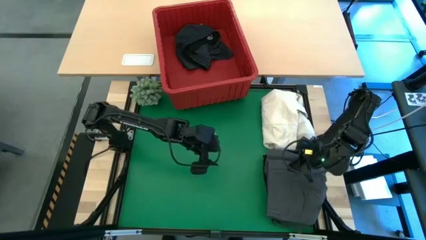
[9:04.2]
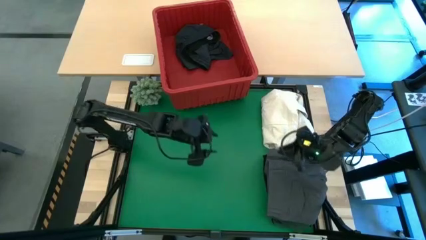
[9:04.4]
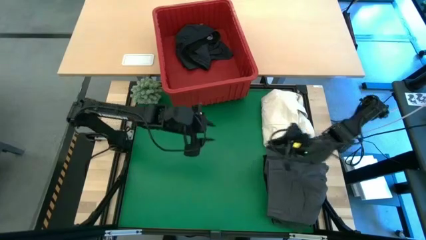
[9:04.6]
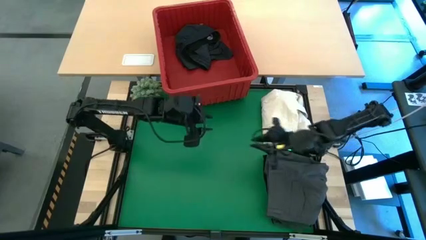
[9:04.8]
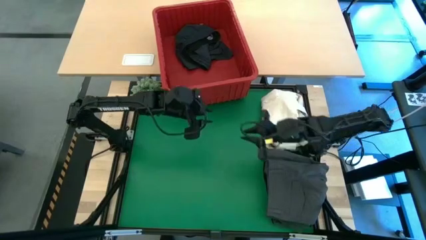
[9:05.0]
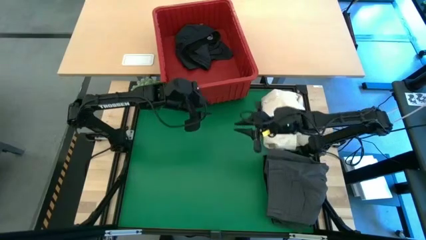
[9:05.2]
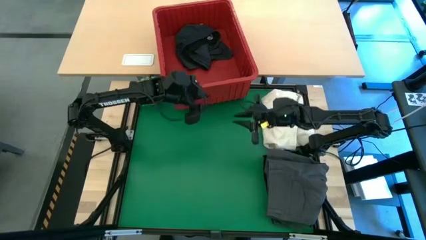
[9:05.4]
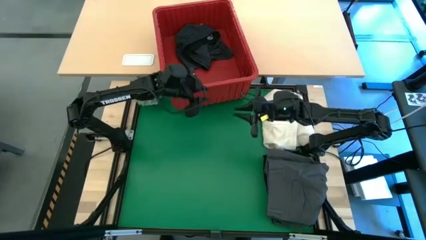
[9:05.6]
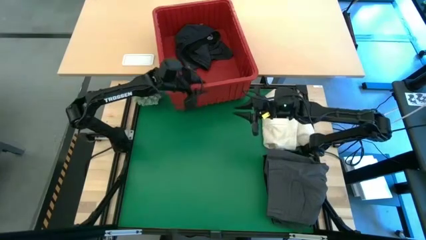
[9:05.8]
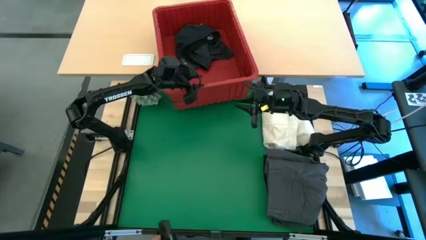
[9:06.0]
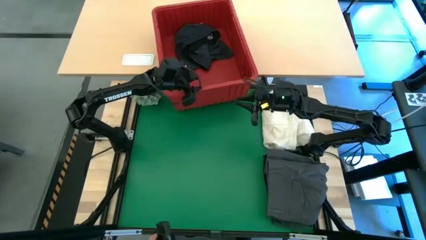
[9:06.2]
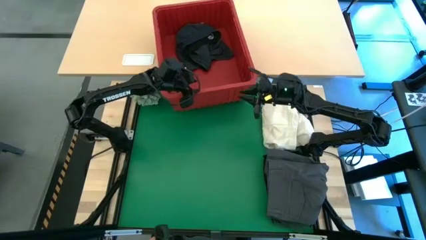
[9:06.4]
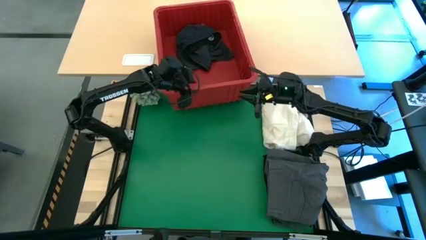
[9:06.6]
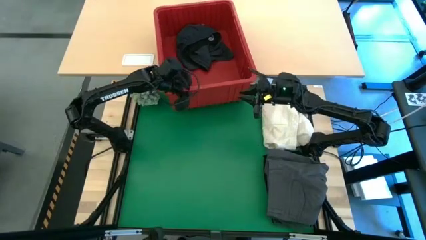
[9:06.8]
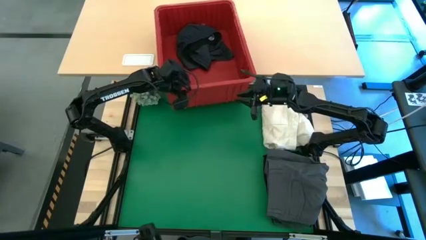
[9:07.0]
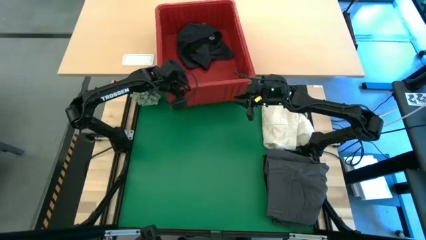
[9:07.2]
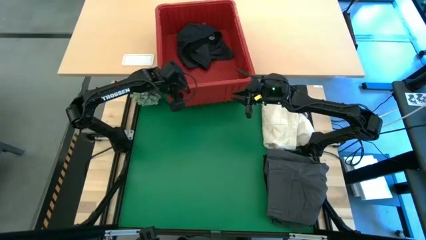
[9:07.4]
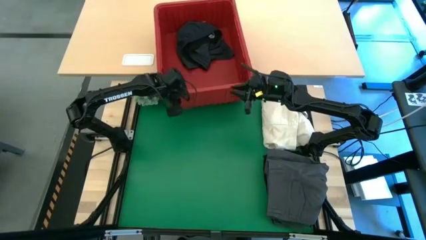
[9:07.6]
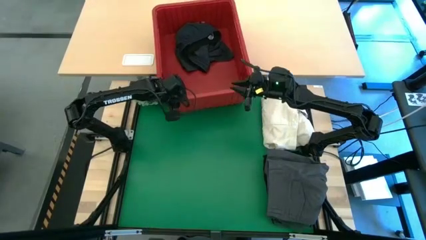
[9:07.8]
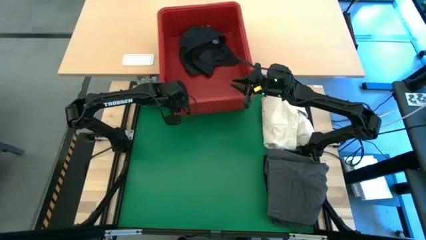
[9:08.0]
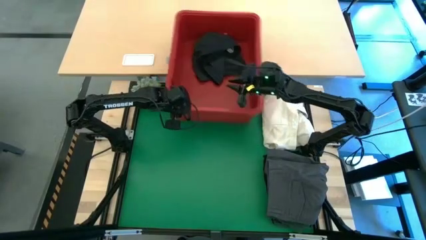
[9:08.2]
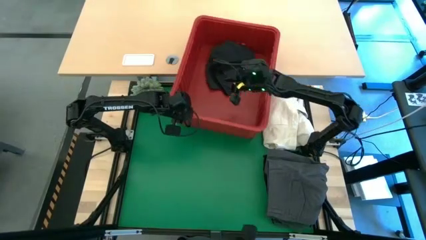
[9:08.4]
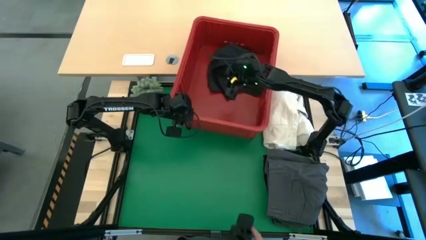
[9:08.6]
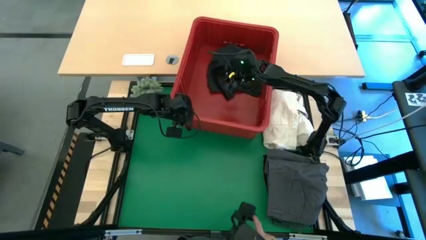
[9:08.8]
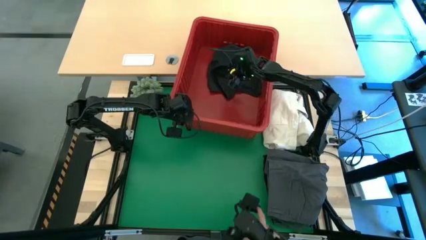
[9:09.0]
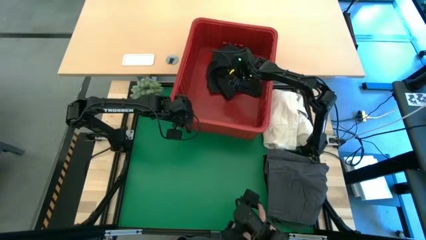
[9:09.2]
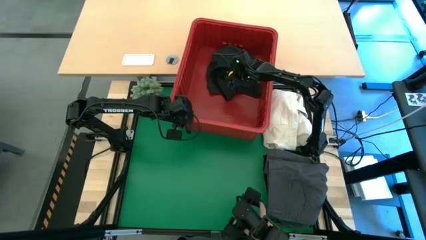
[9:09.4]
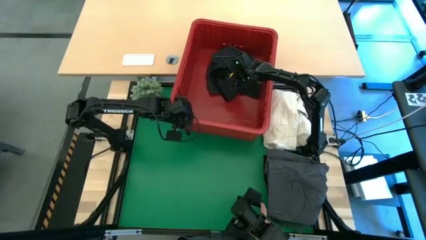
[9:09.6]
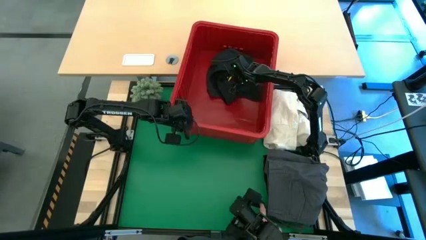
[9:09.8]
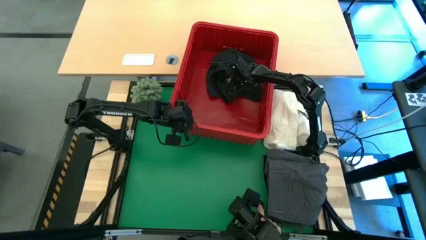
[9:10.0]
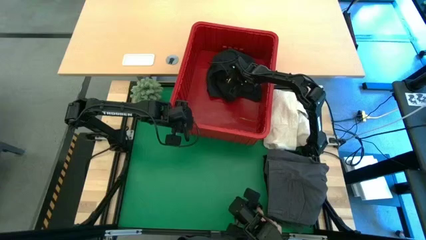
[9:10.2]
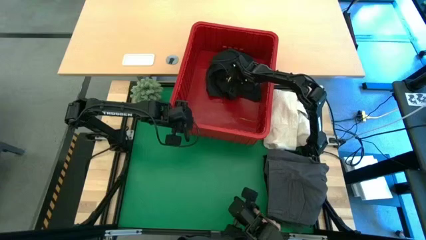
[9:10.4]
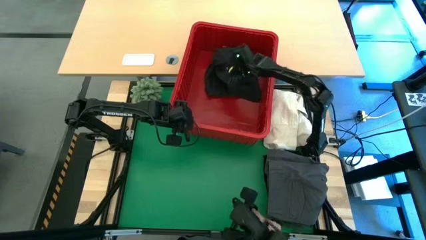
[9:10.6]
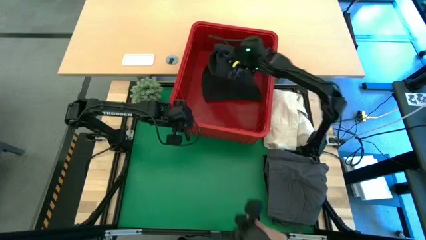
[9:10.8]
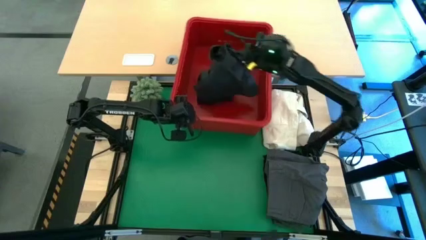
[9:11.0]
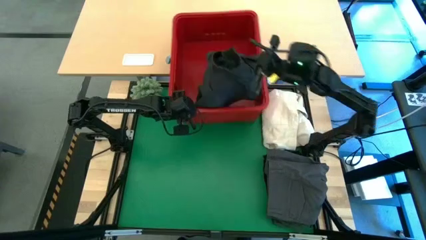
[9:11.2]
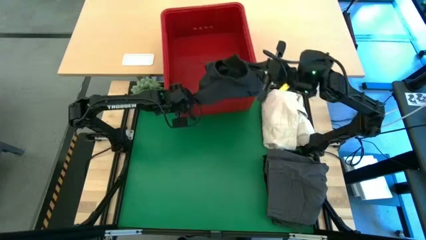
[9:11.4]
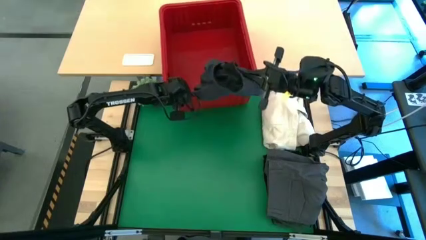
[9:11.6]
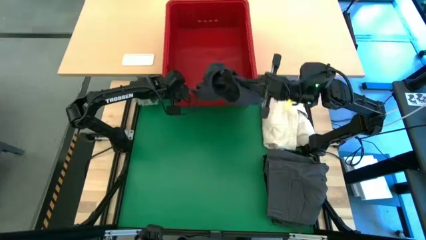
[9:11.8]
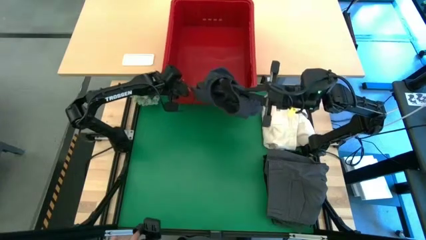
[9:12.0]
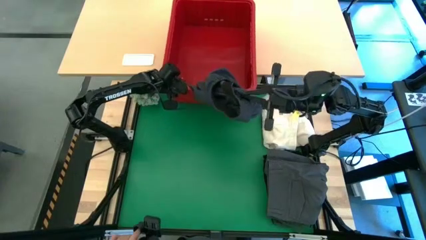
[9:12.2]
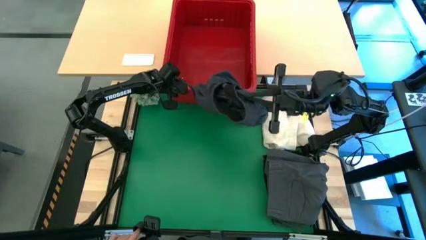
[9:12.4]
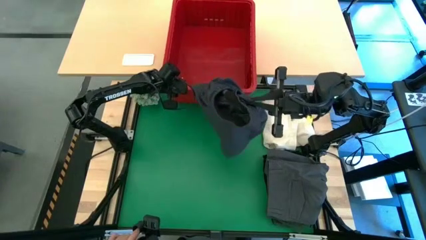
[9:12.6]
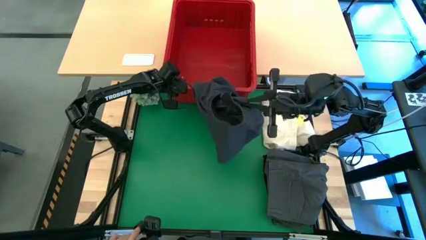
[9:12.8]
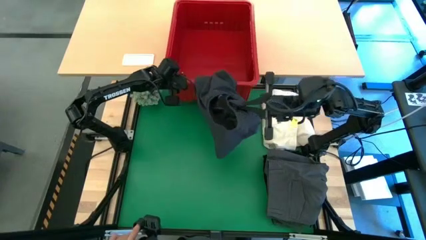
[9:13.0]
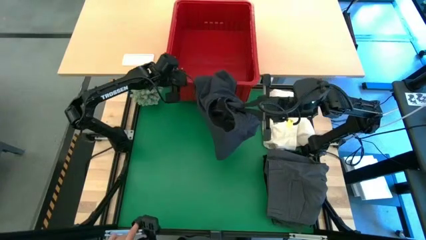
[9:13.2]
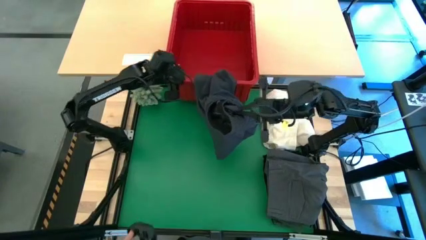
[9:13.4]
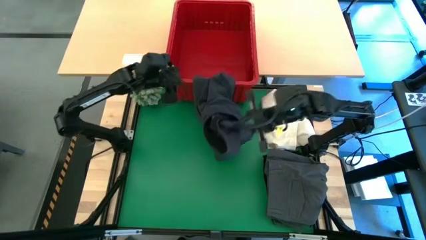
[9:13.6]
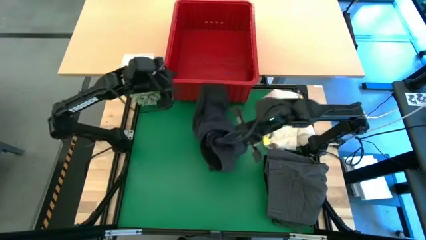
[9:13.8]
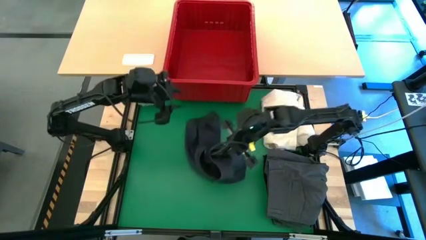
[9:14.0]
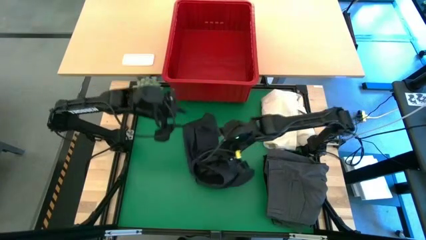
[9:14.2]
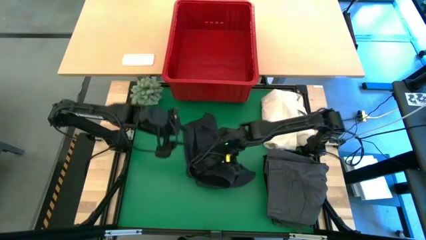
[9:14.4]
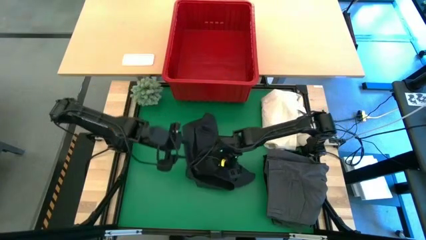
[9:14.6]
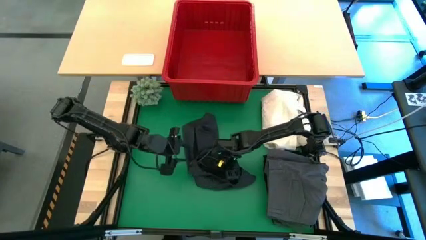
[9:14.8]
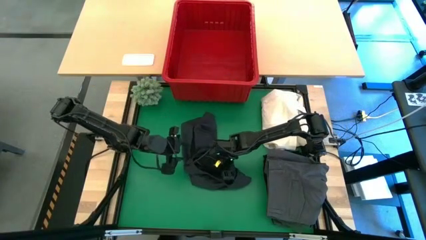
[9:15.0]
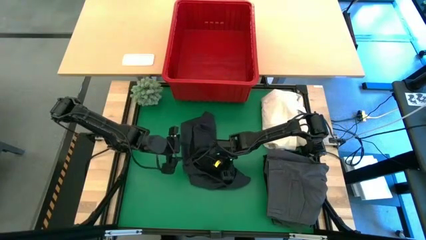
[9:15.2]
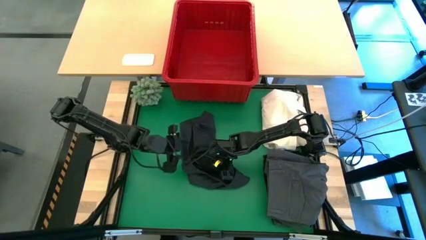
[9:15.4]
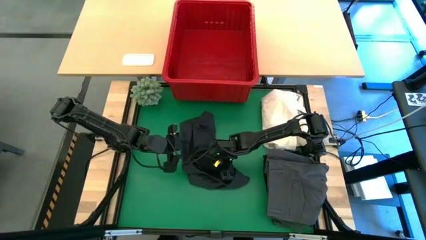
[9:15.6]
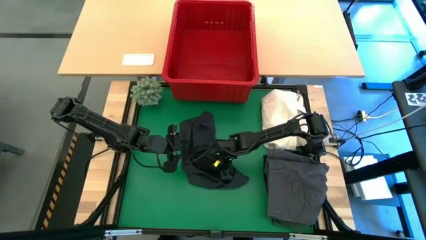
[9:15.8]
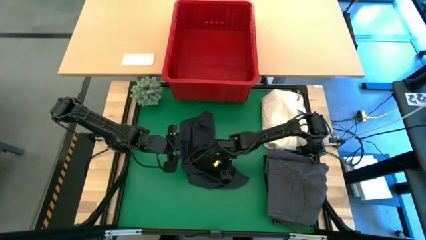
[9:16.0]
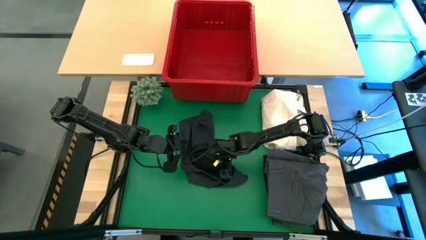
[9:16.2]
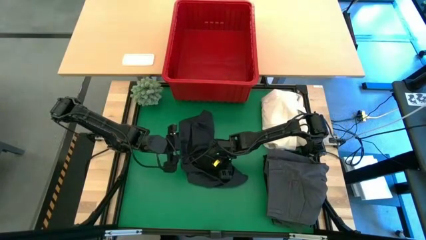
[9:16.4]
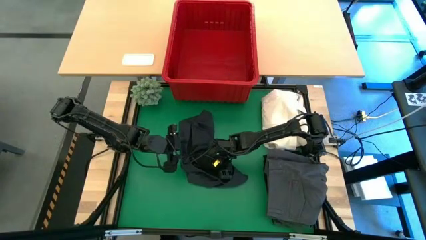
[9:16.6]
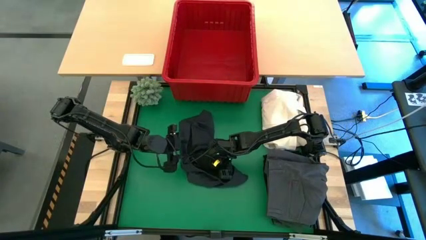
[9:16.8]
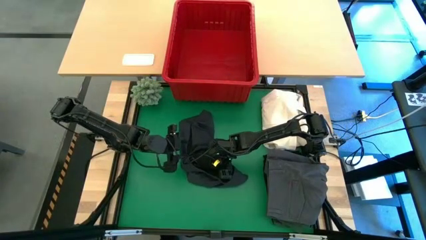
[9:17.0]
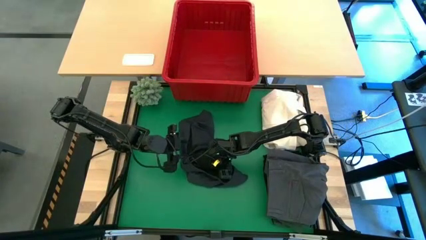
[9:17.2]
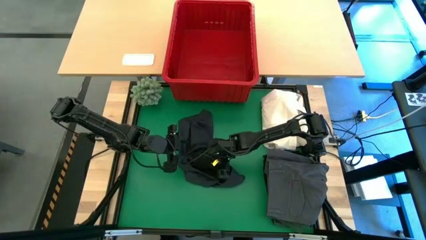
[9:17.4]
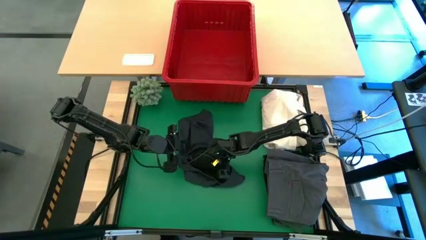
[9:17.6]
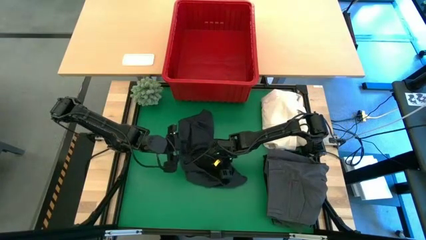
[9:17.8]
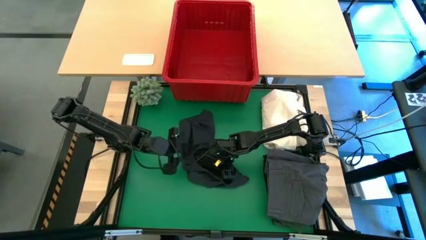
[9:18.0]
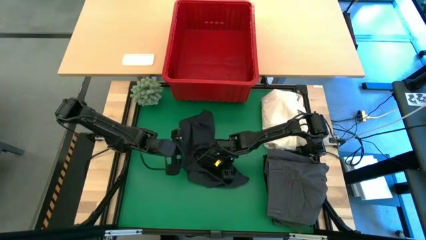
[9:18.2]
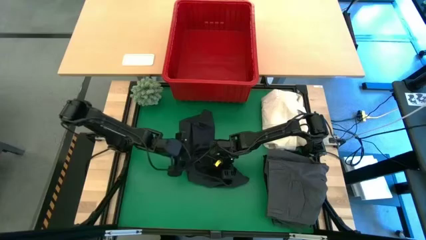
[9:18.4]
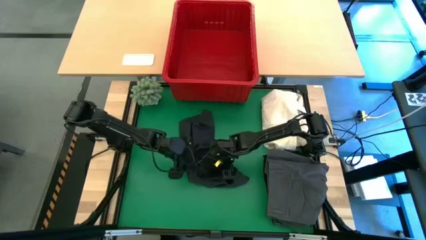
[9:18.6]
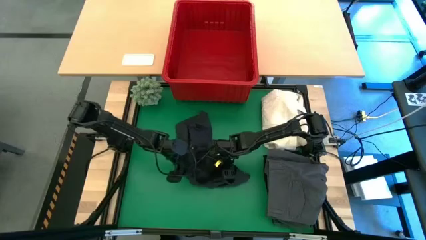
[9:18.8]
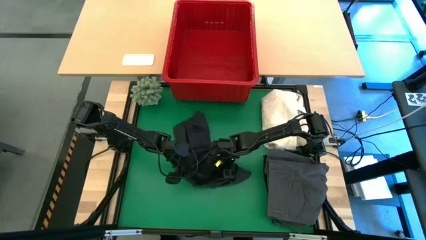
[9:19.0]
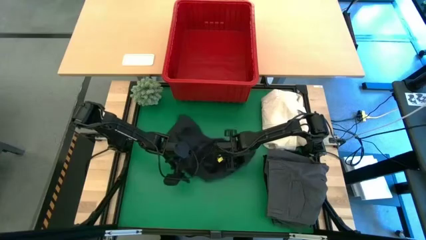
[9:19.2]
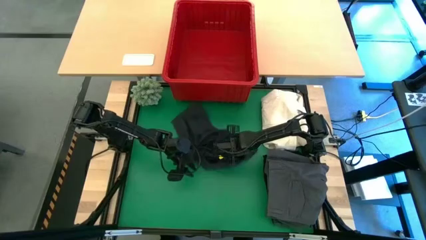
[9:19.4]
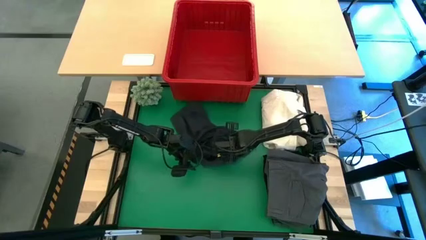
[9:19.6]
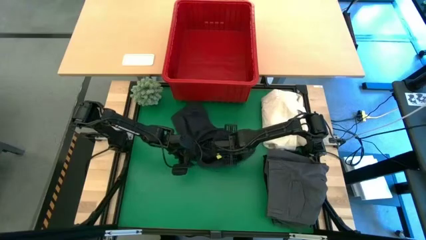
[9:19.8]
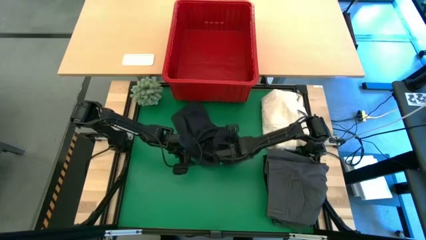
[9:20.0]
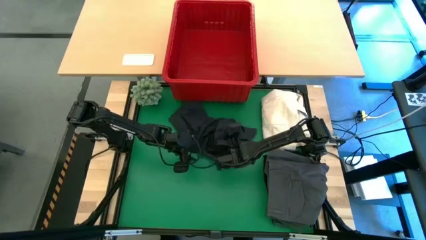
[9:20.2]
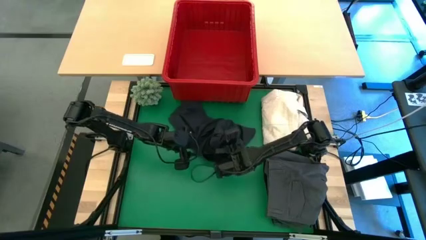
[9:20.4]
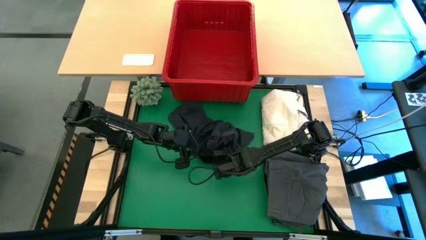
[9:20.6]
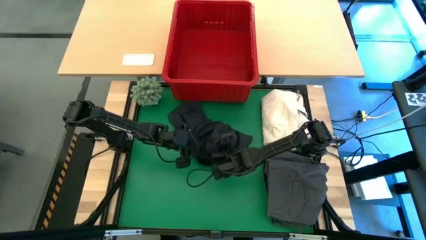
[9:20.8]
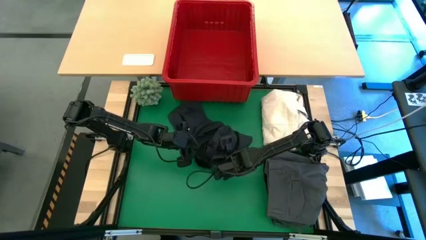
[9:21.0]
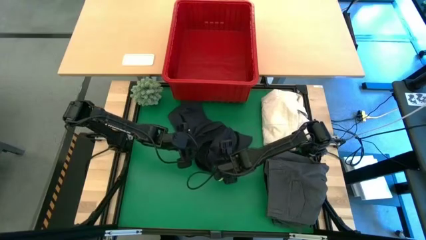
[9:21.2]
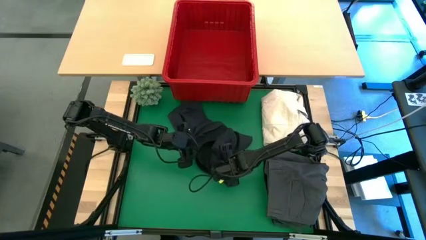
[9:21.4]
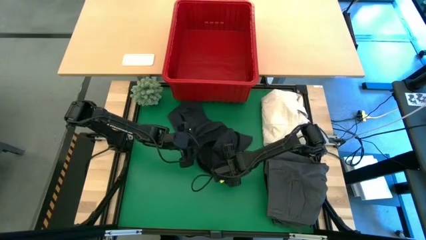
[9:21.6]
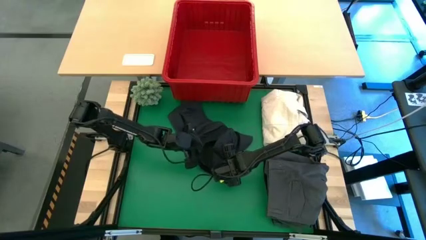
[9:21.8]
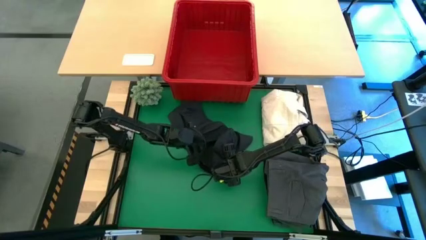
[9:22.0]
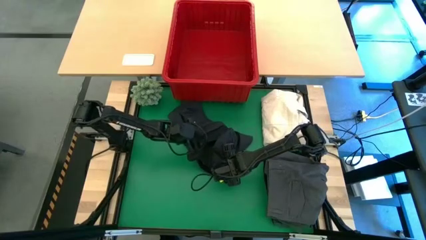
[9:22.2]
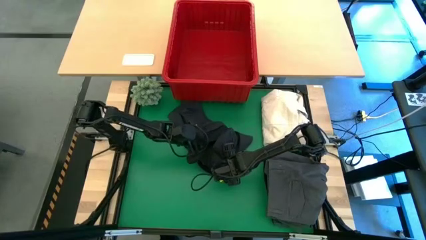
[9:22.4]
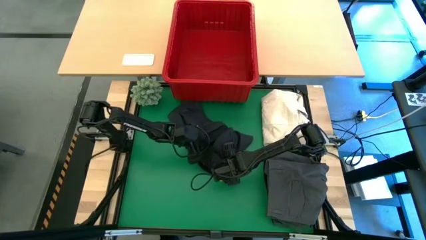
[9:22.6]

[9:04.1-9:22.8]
Task: Fold laundry
Fold the gray short
